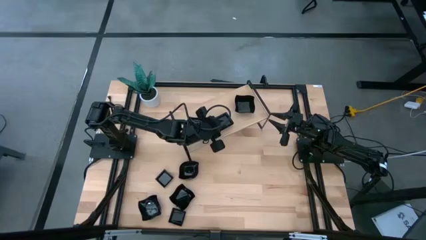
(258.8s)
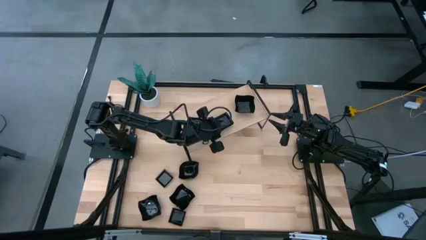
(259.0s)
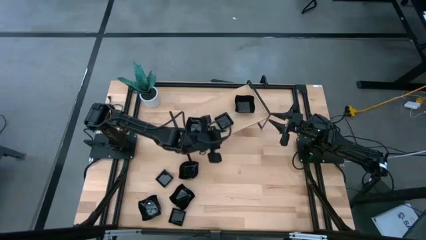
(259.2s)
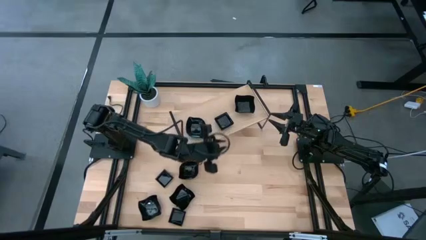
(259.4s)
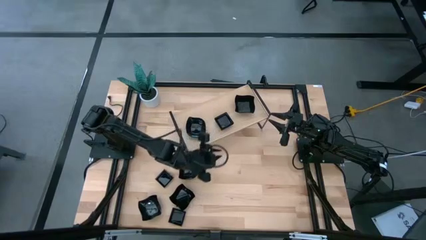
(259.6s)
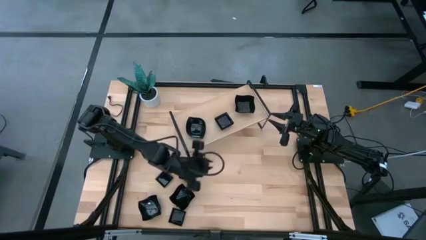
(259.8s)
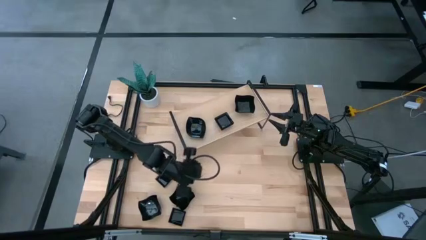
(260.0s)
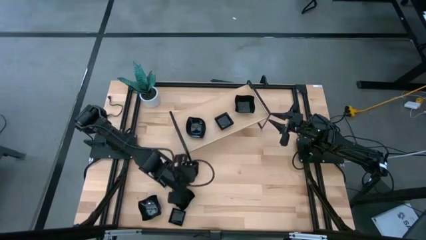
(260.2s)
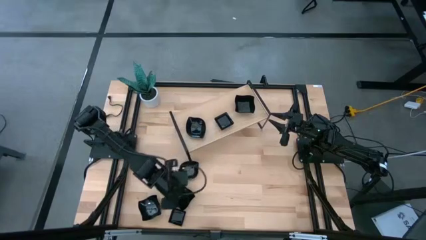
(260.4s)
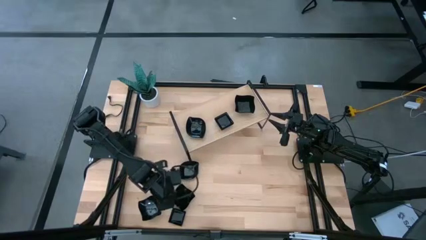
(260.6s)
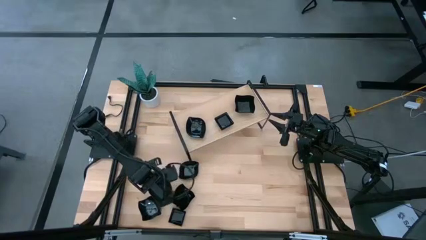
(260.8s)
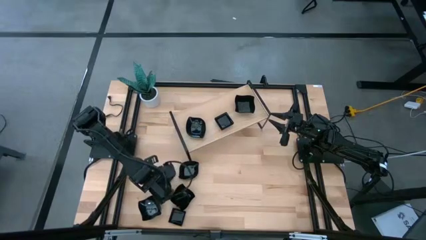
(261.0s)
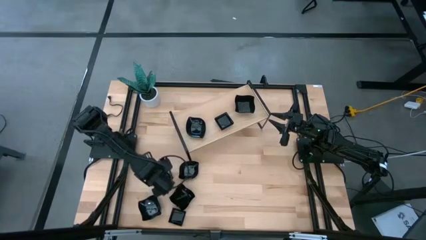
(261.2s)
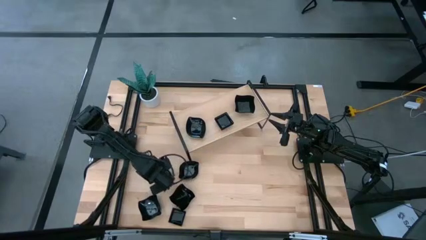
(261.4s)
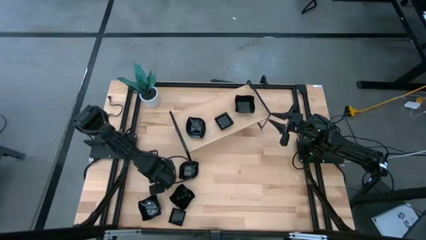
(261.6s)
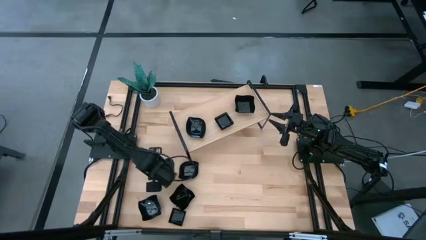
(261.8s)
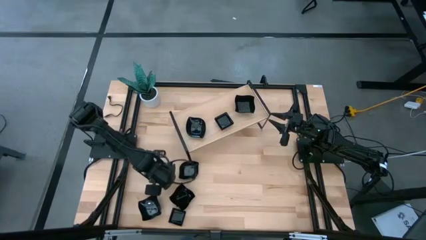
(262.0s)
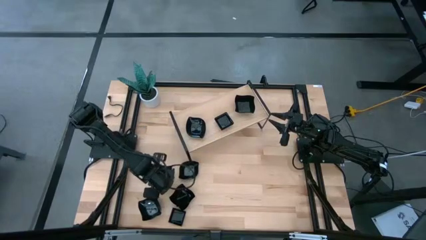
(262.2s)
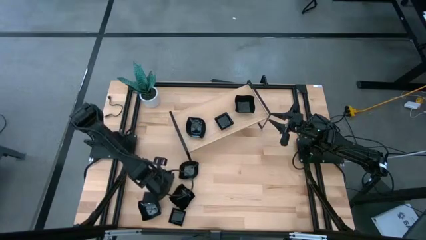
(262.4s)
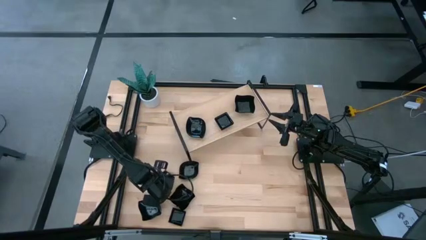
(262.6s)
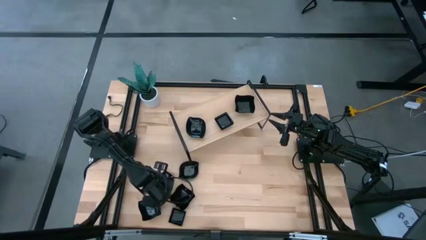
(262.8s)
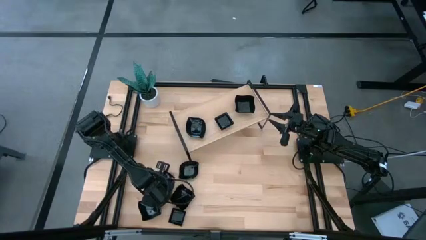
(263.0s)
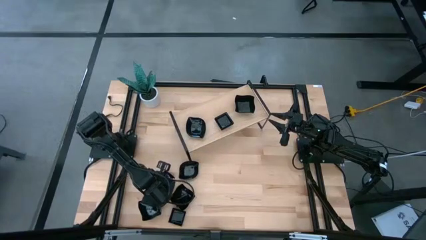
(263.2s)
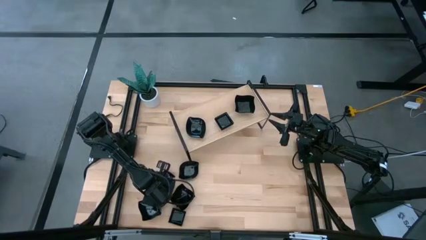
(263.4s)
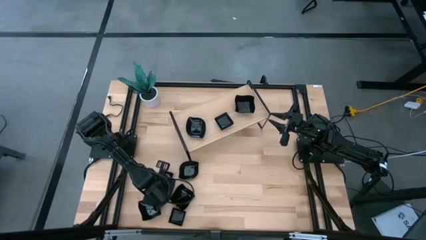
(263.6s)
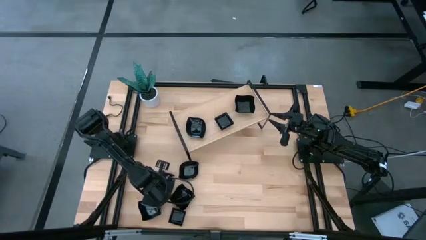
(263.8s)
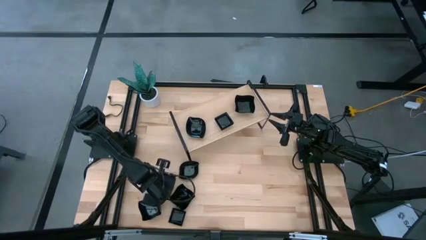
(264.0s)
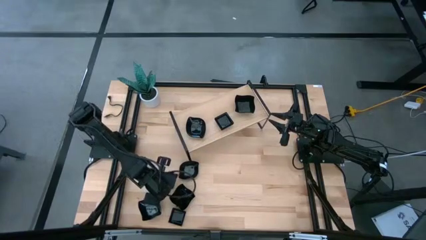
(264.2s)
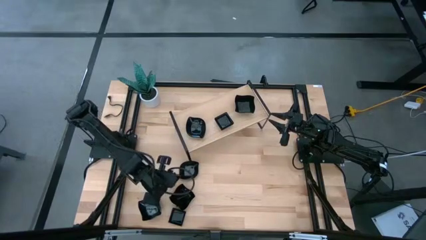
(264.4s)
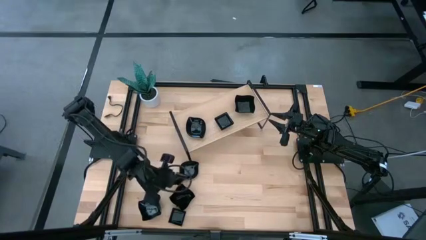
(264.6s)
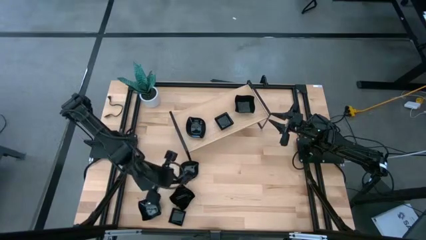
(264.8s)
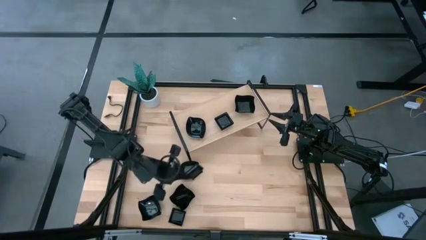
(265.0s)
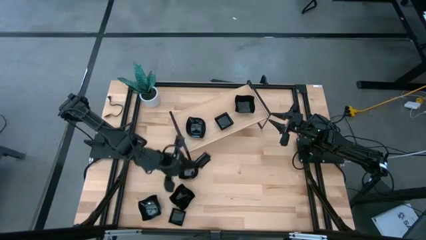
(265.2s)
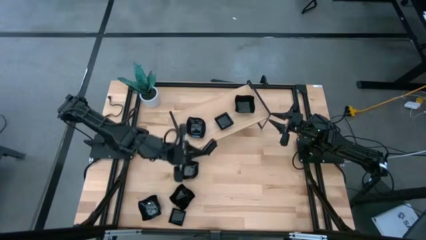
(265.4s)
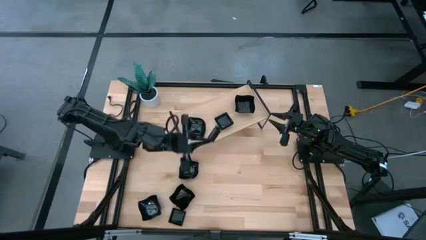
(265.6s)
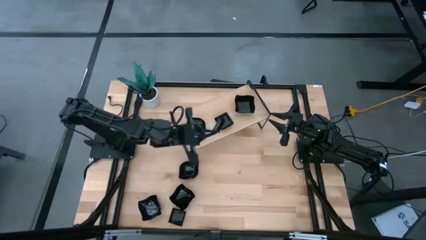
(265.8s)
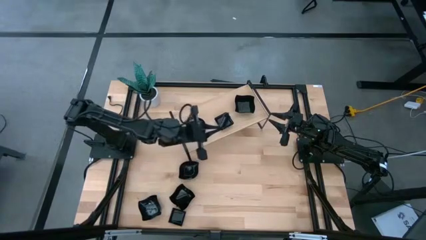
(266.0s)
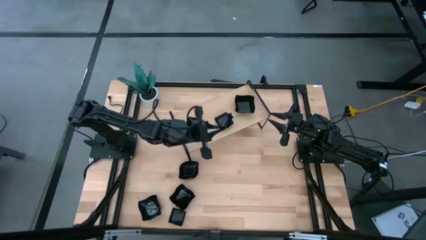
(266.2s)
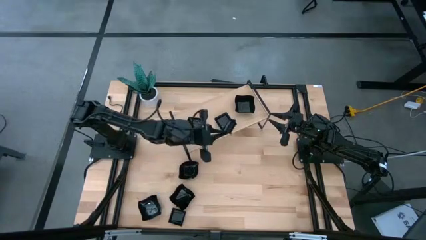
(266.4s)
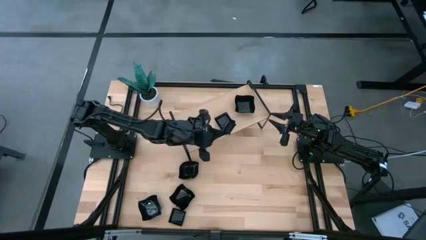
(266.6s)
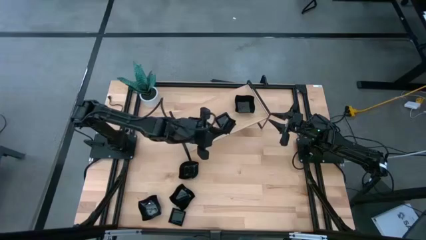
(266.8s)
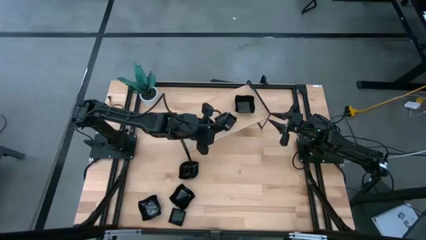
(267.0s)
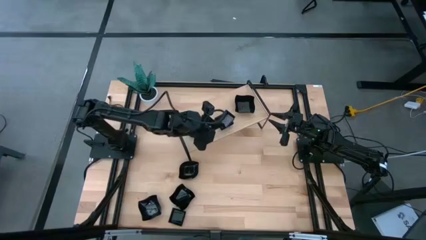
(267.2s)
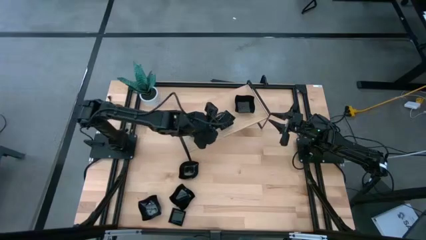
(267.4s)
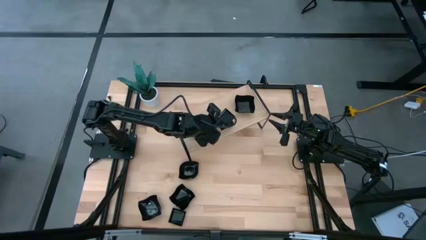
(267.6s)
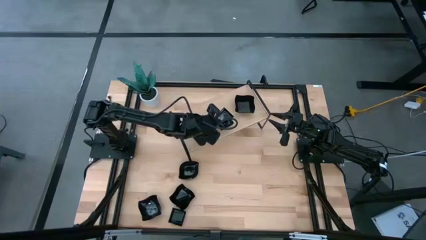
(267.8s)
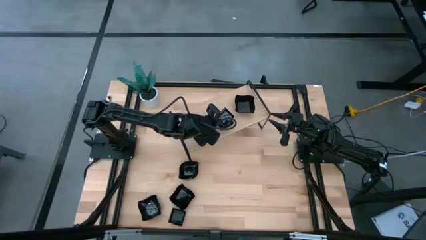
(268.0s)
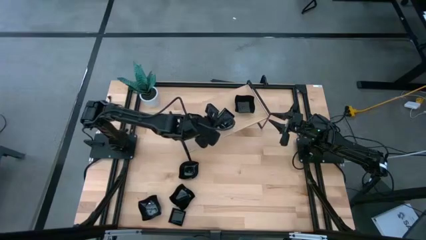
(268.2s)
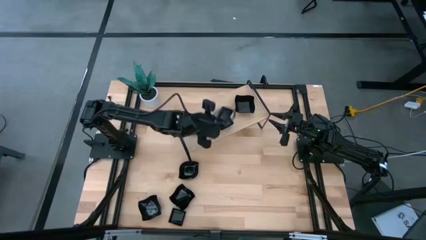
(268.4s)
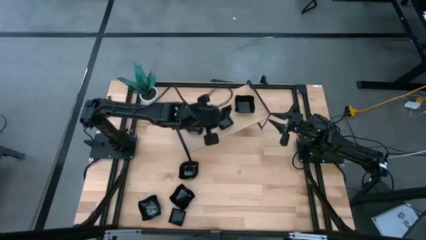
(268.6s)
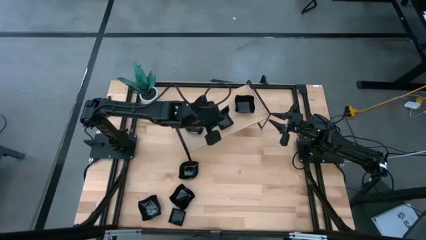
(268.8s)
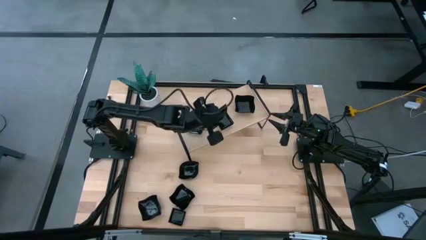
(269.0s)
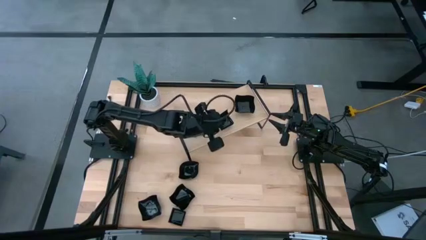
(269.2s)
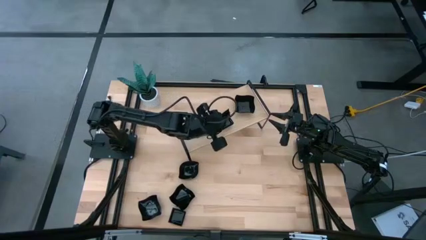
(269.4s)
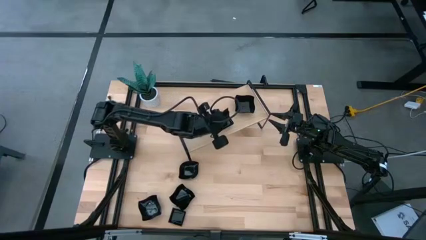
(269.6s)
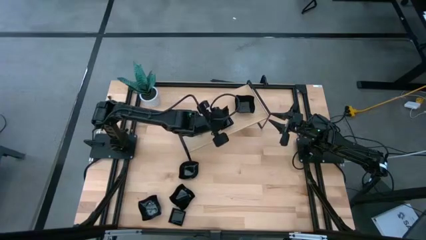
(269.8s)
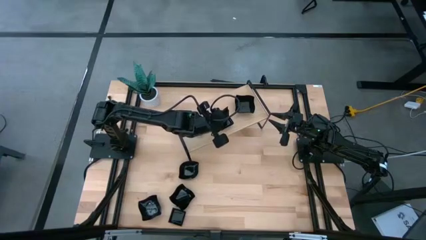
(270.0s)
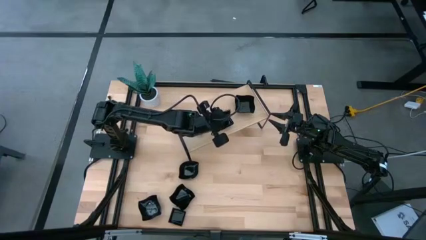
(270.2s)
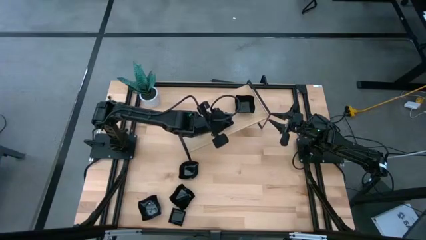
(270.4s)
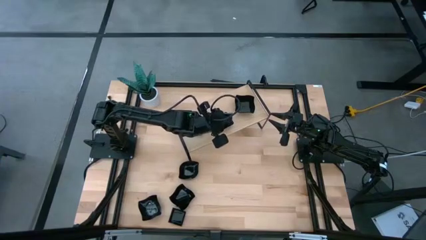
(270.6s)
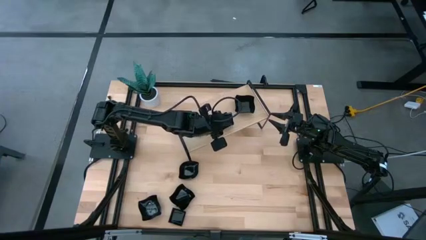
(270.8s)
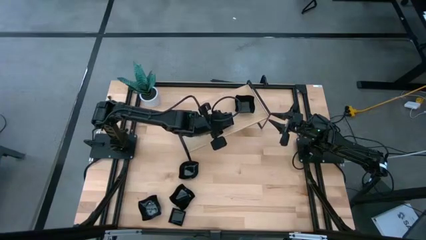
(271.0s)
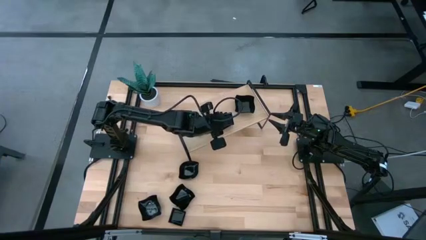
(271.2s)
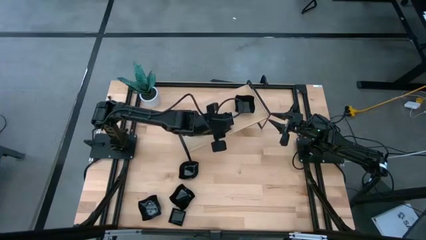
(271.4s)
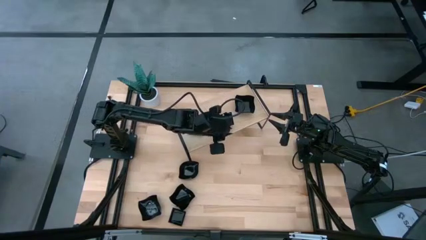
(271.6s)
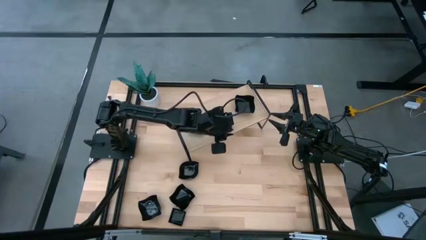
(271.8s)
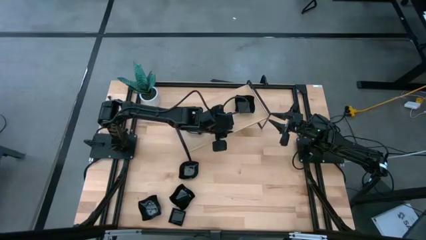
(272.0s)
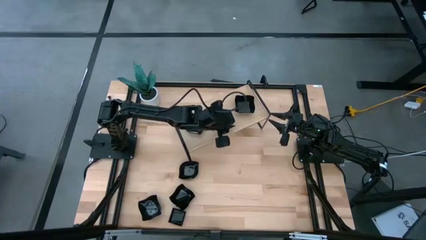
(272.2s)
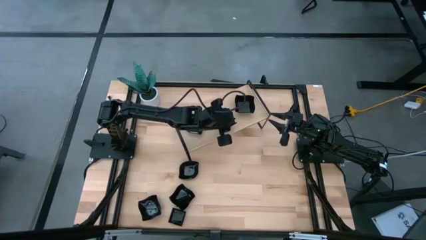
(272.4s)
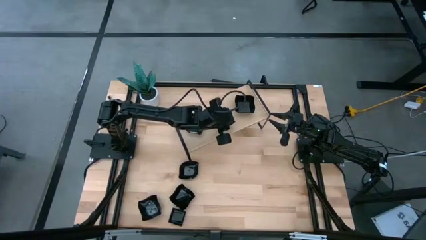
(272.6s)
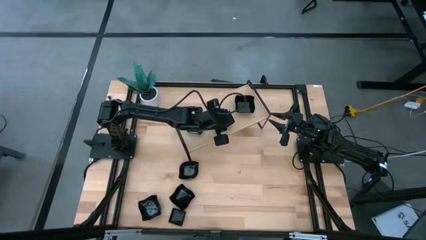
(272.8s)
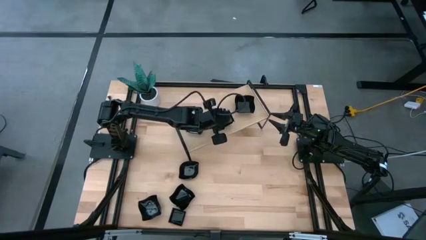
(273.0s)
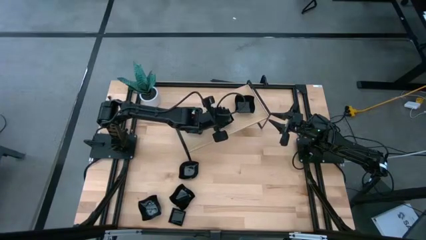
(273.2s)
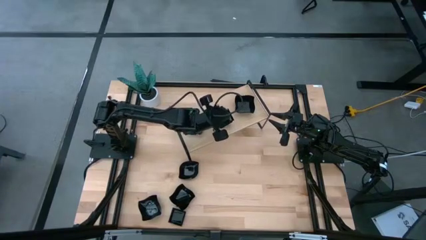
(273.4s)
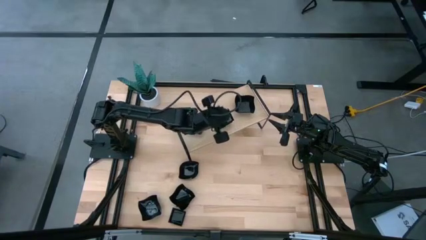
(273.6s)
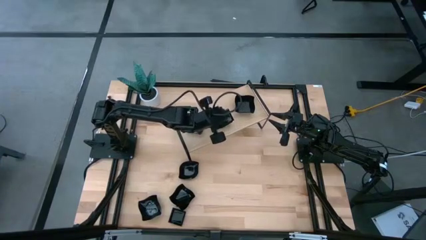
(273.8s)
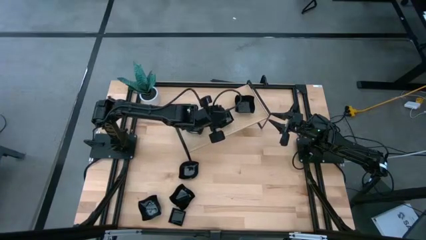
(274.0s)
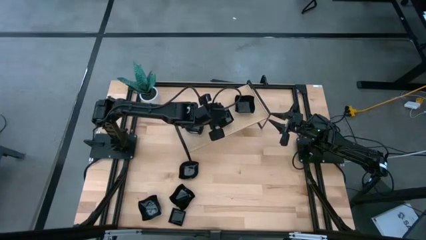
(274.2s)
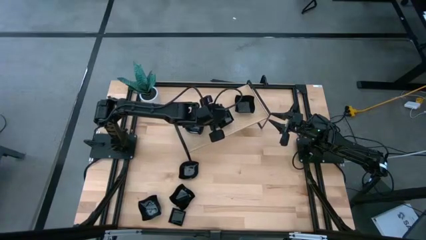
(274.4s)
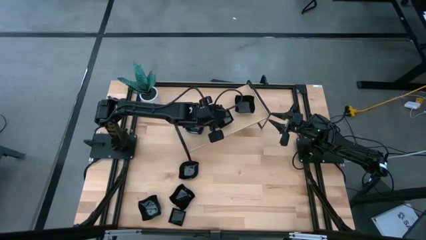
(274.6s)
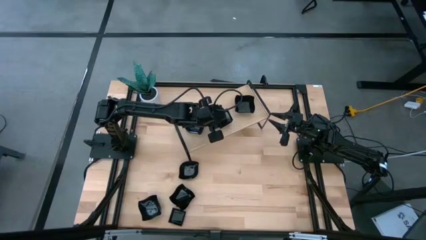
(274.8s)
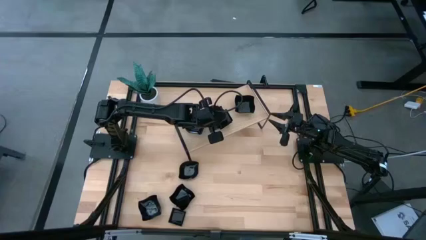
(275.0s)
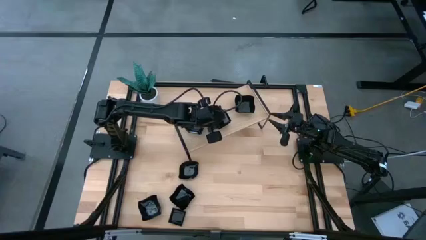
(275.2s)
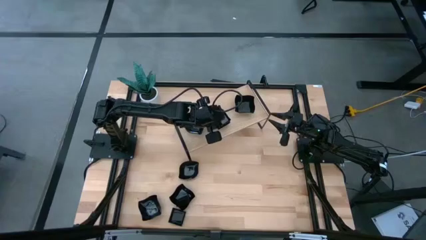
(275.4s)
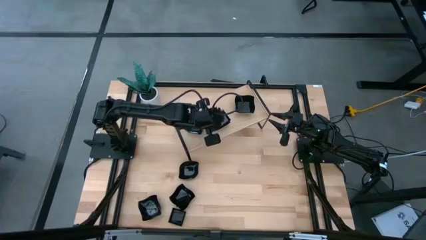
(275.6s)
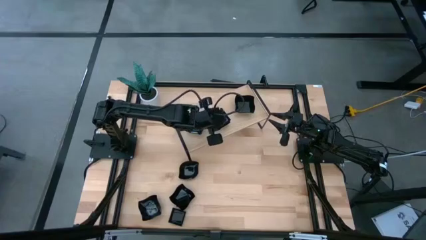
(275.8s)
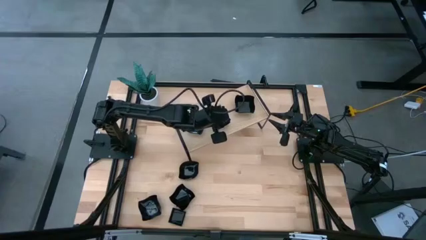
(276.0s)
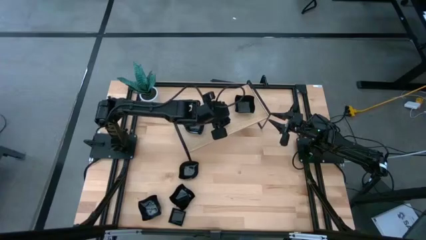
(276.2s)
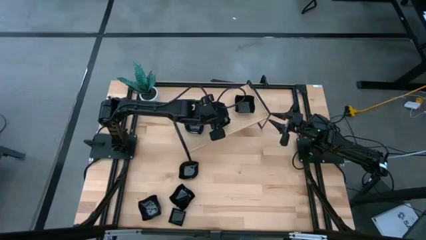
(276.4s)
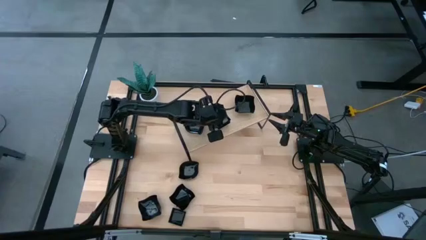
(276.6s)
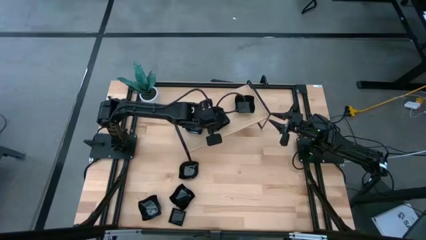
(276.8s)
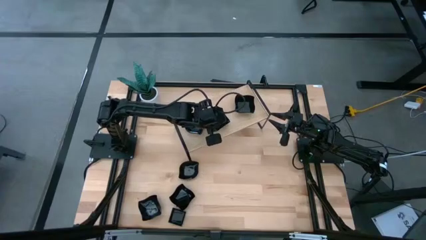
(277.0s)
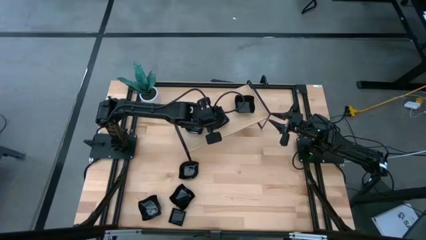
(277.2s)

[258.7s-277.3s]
Task: Pick & Place Mini shaped plates
Stack the black square plate on top of the black square plate on the shelf
